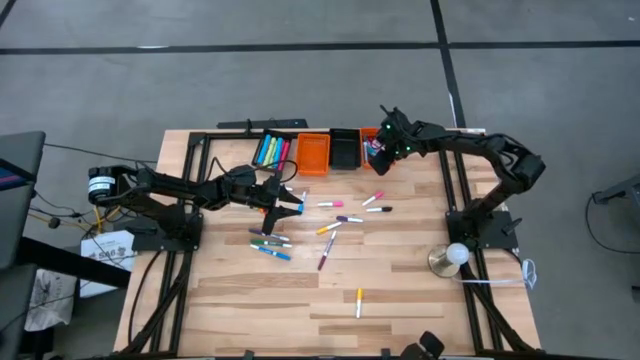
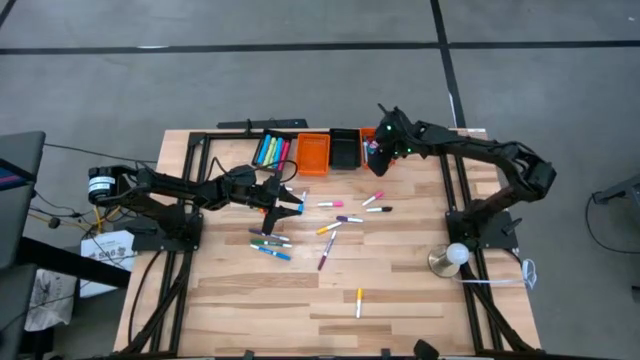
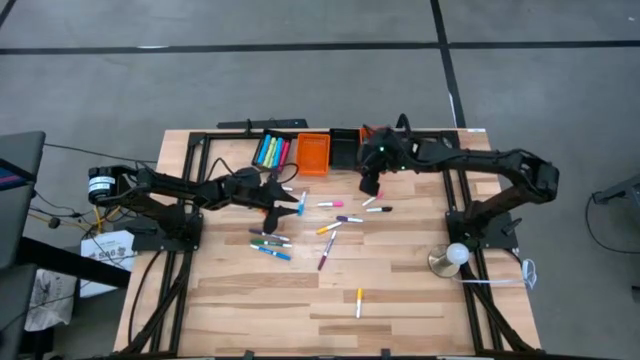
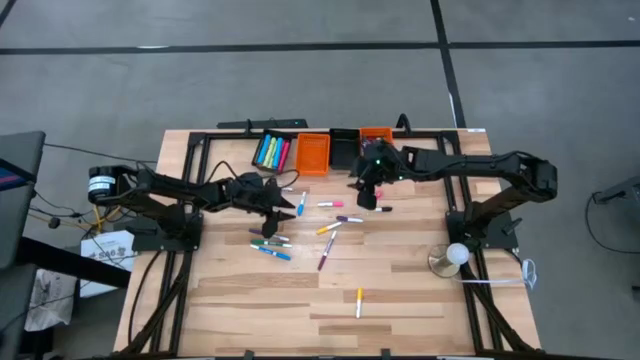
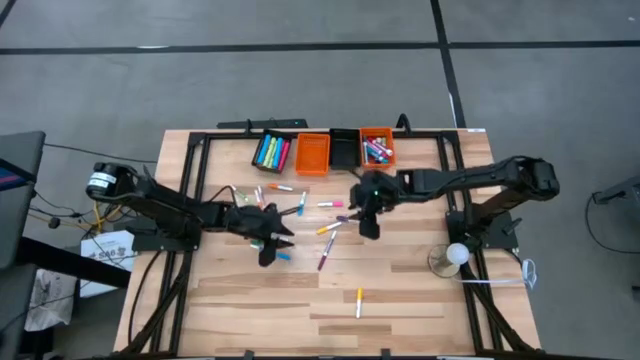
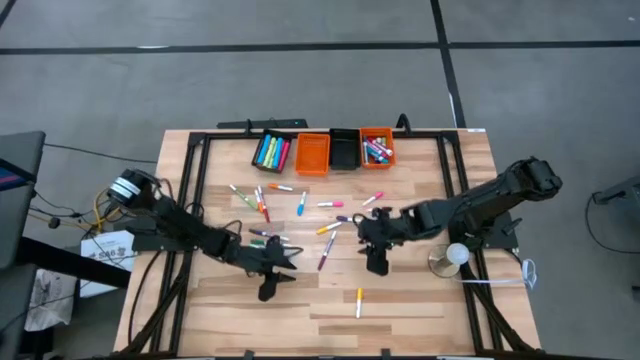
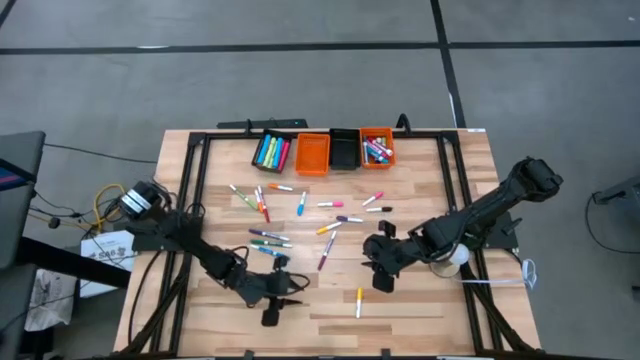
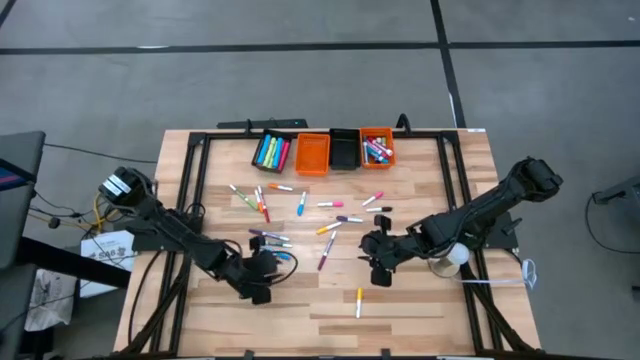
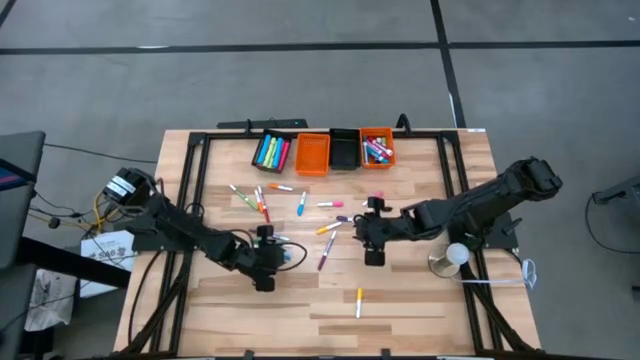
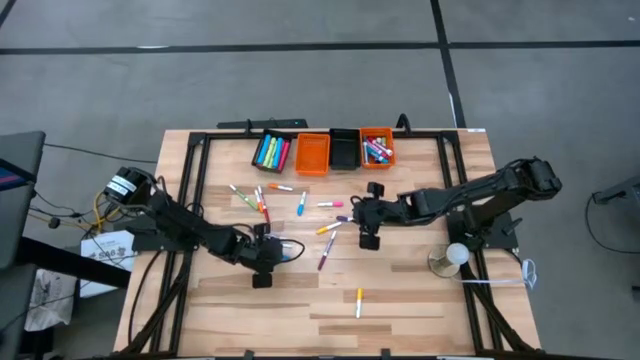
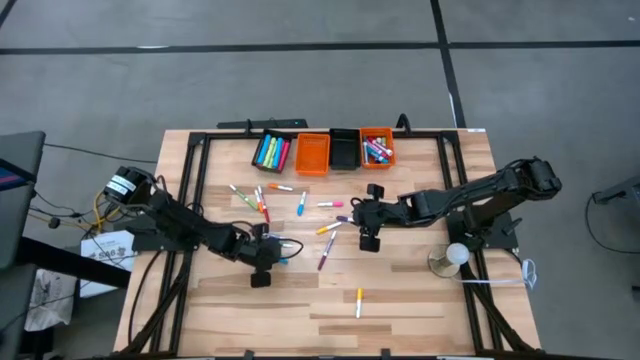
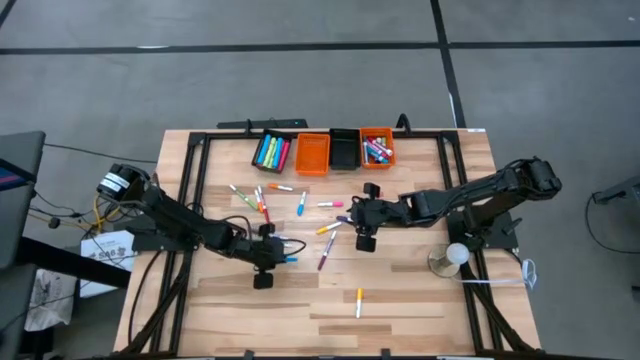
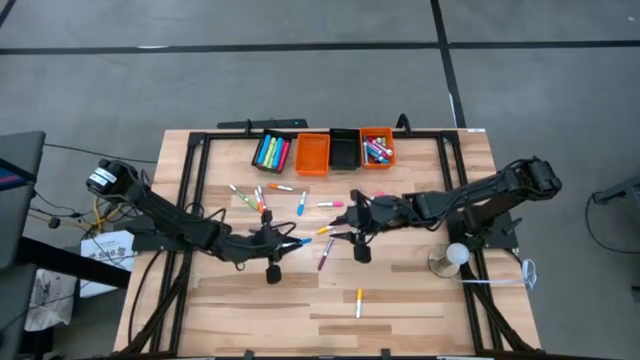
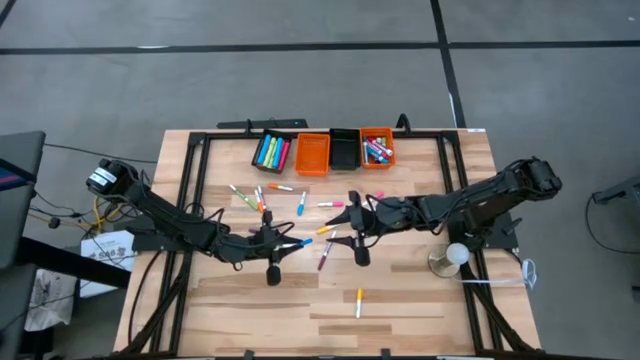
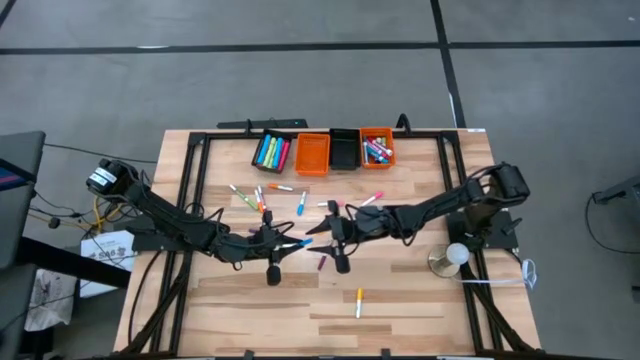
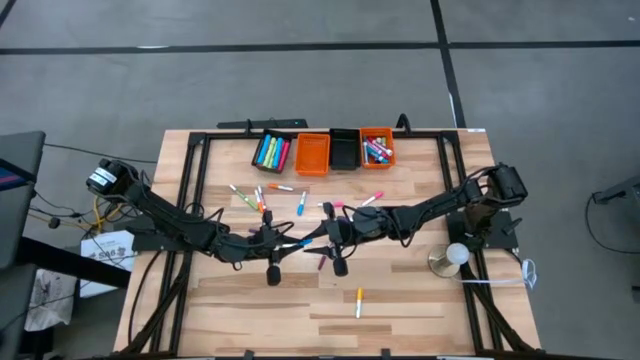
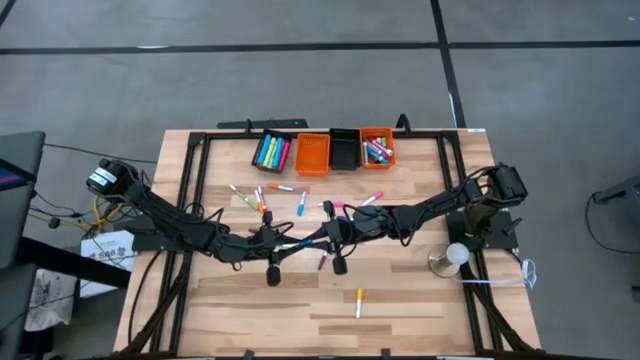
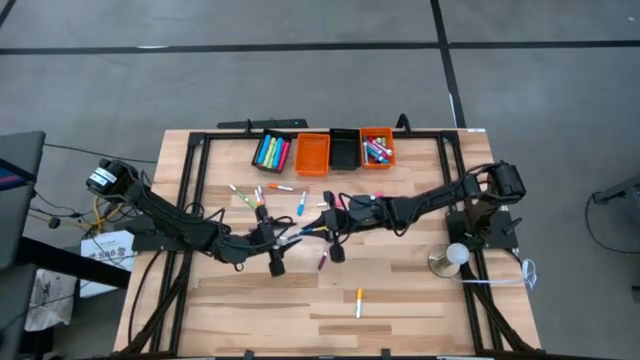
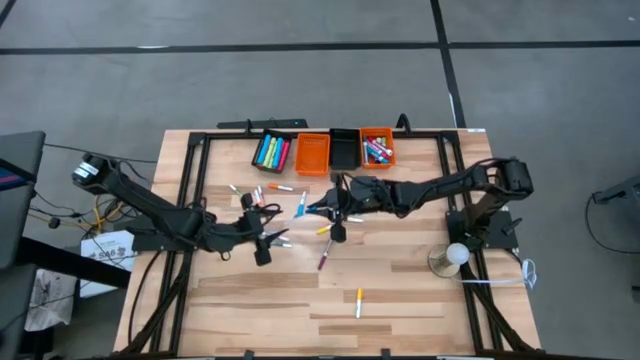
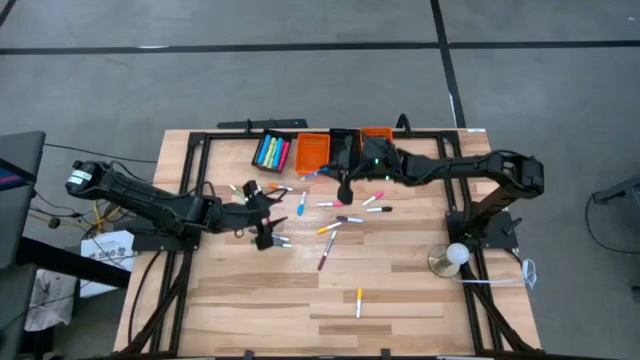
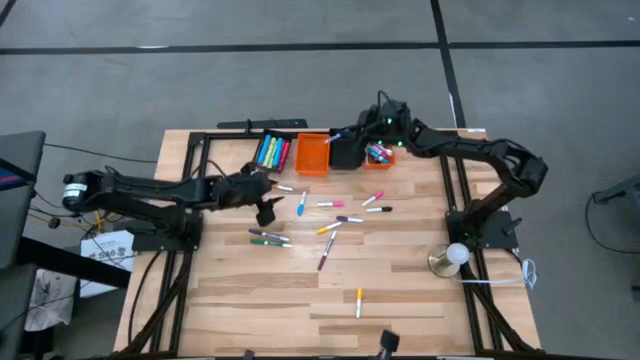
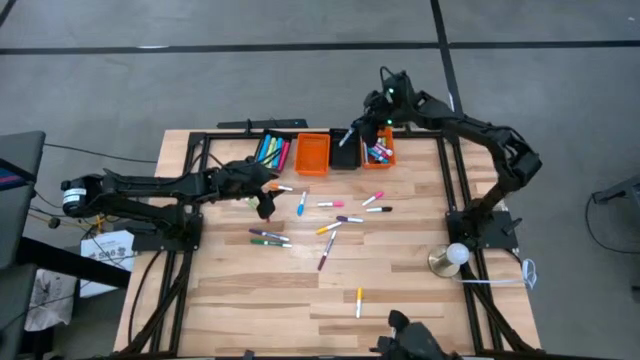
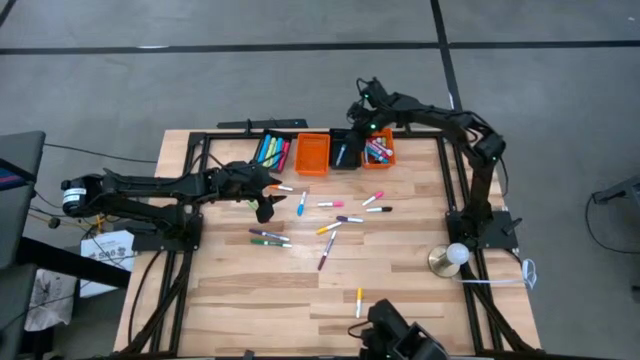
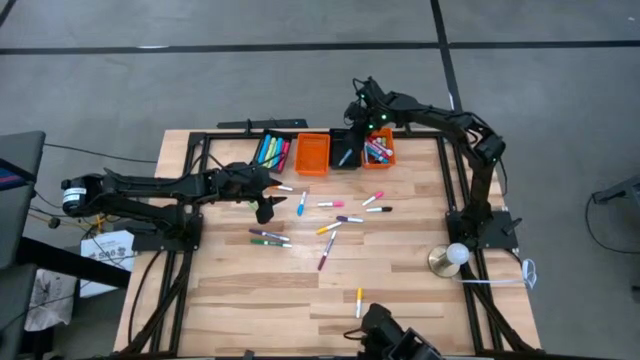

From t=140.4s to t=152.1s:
Task: Pick & Place Markers
Put the small light blue marker pen into the right black basket

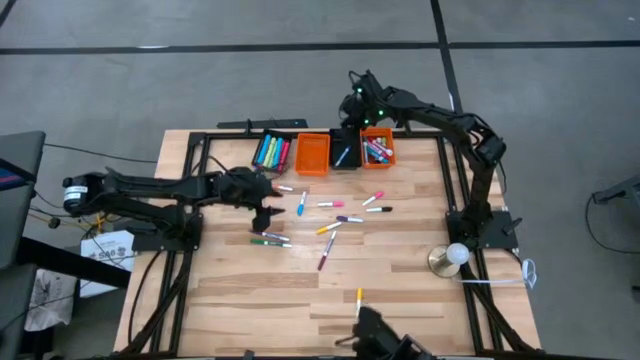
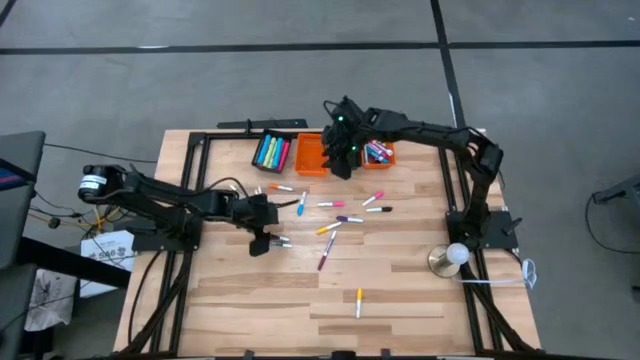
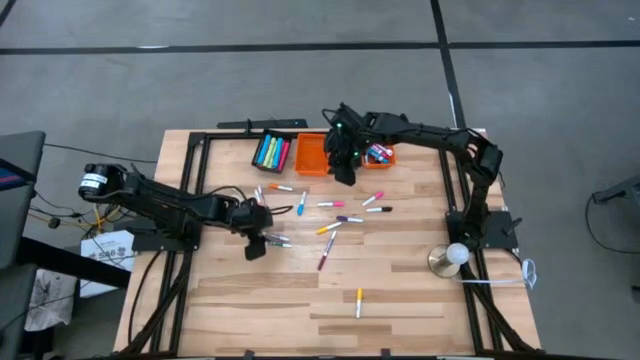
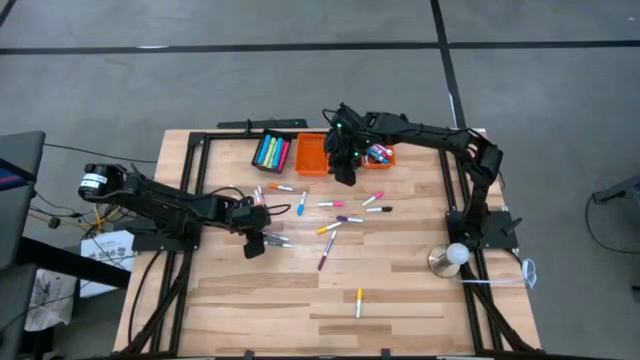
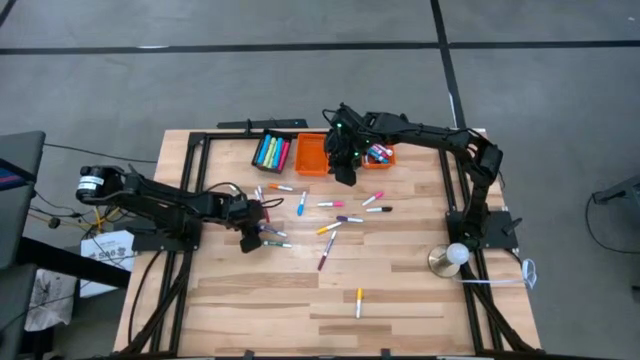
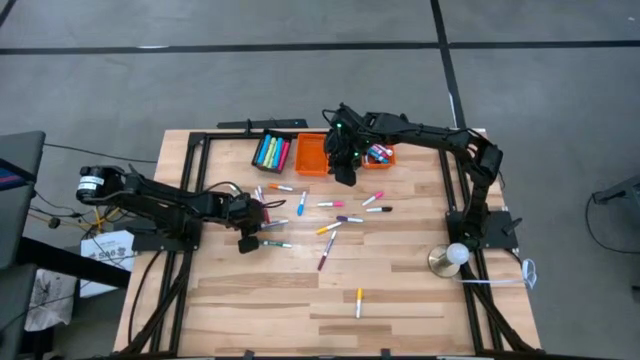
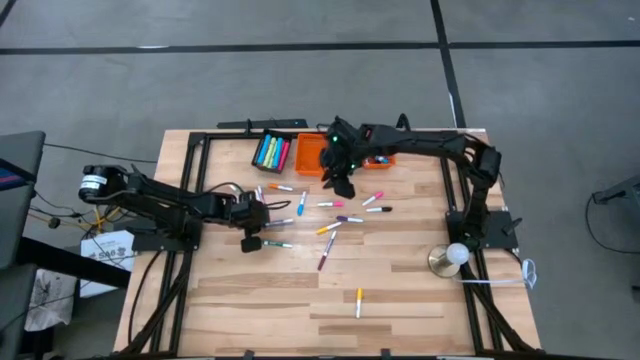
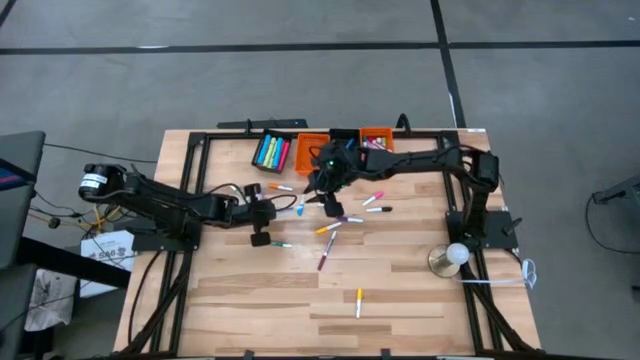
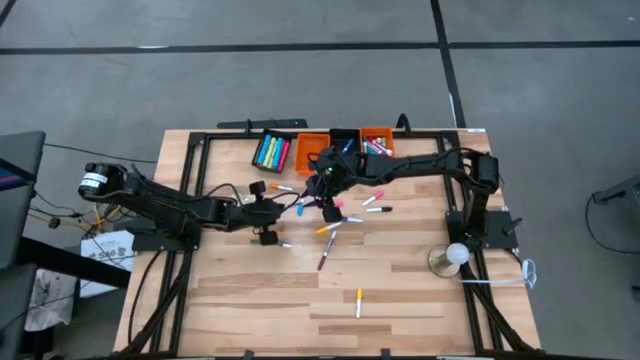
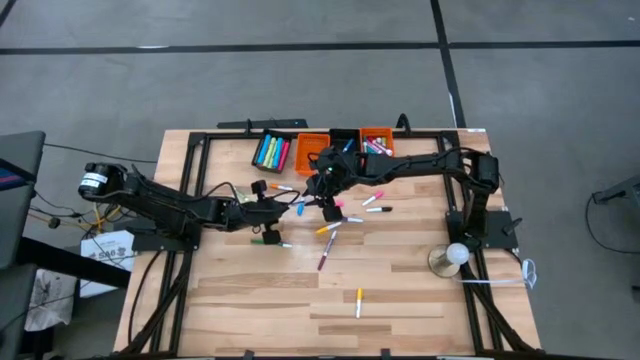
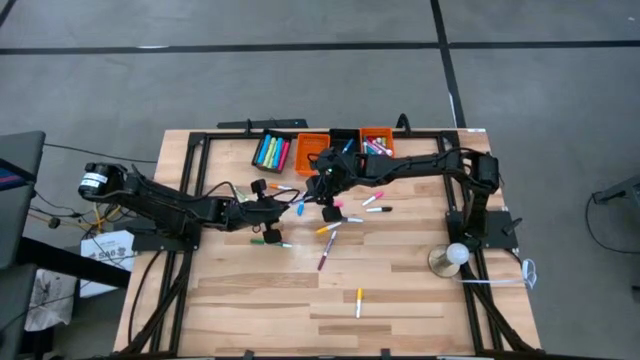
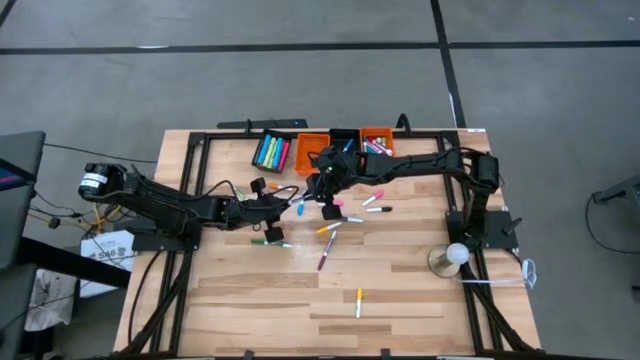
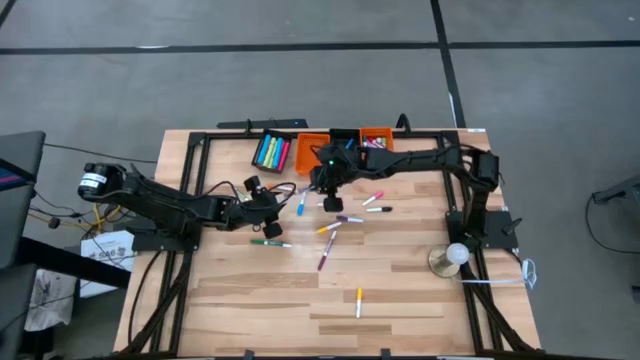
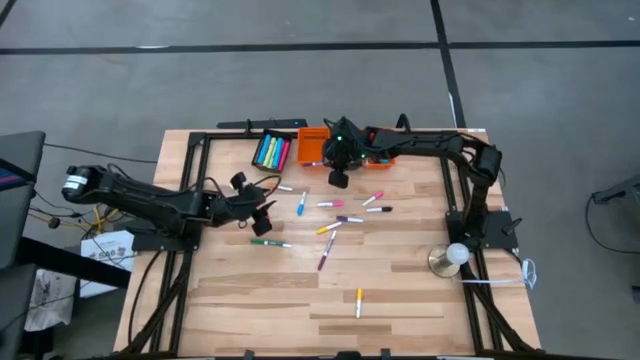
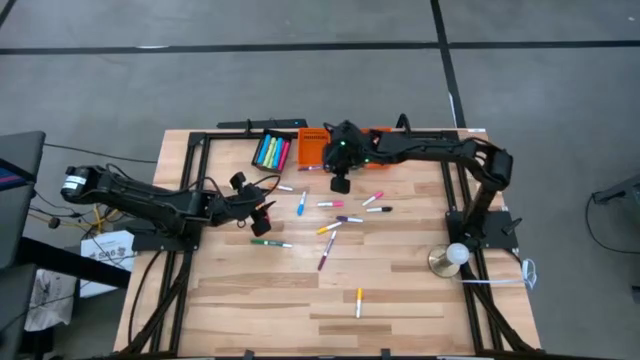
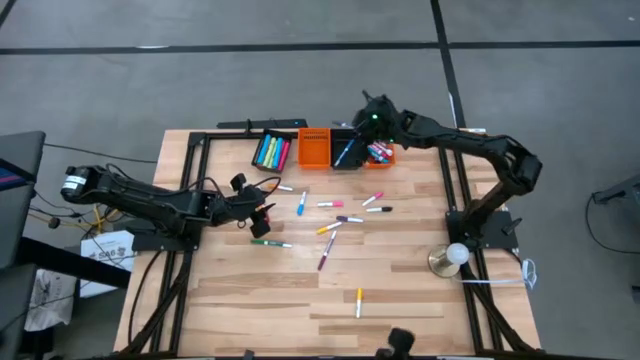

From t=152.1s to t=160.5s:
Put the small blue marker pen into the right black basket

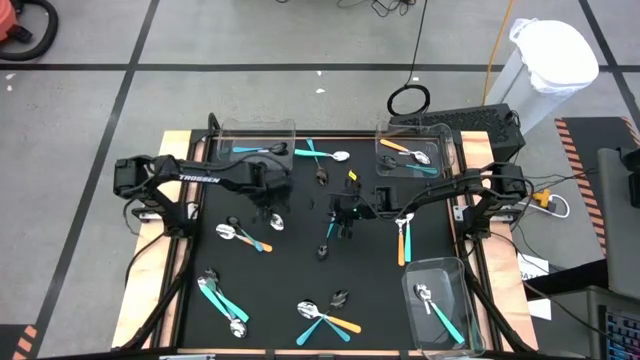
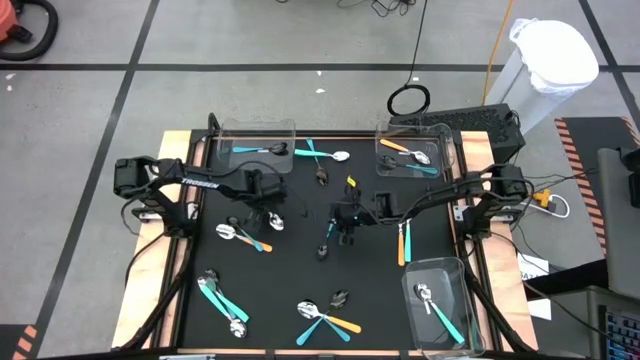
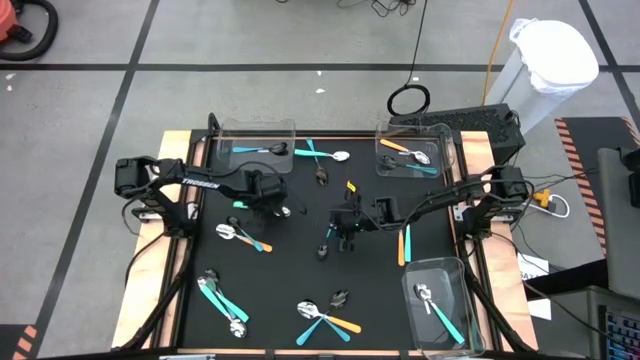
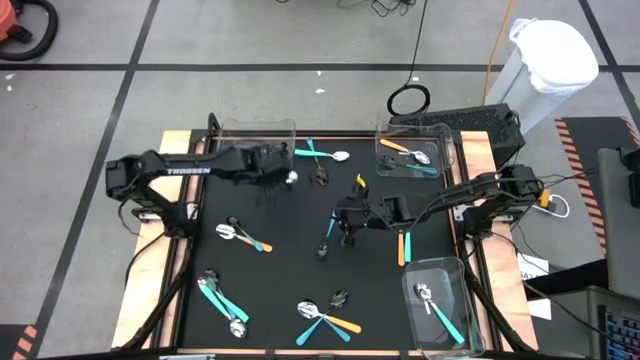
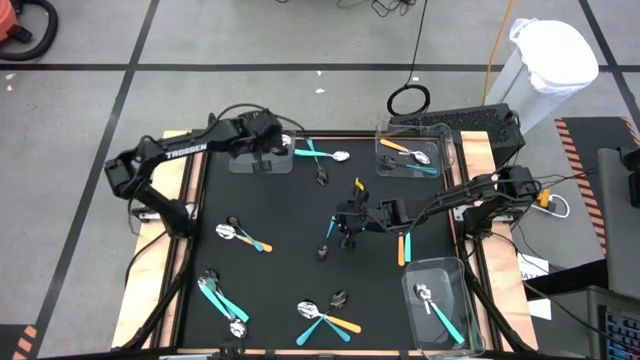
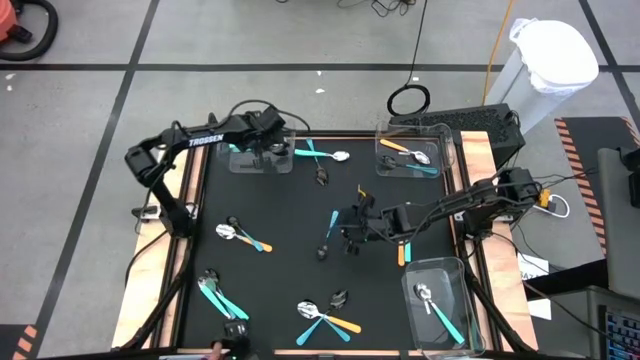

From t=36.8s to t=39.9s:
Task: Sort silverware by color (type)
Put the light blue spoon into the top left transparent bin
